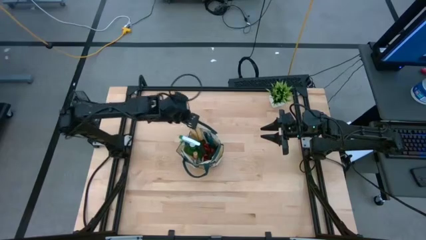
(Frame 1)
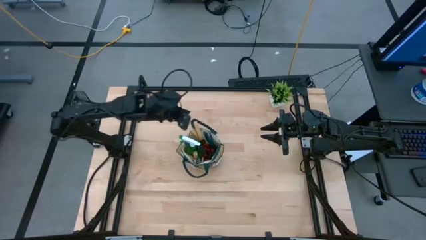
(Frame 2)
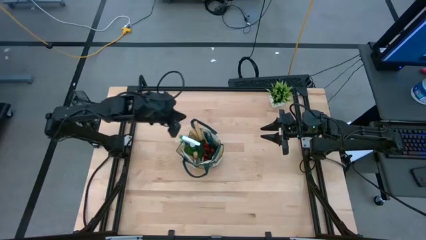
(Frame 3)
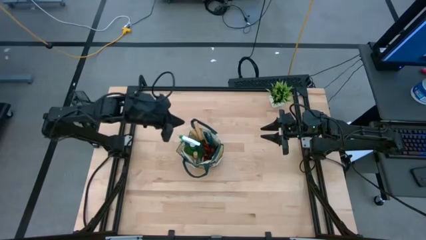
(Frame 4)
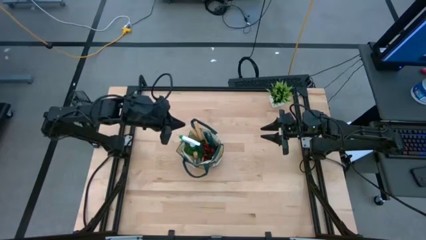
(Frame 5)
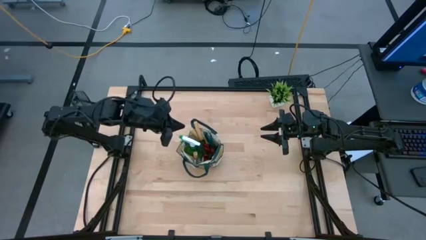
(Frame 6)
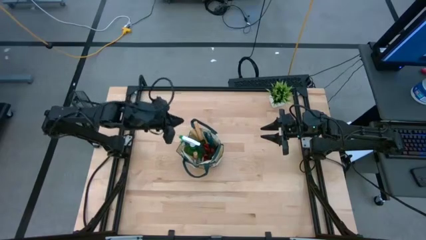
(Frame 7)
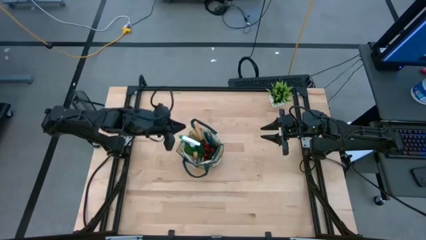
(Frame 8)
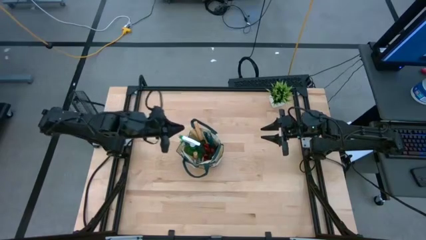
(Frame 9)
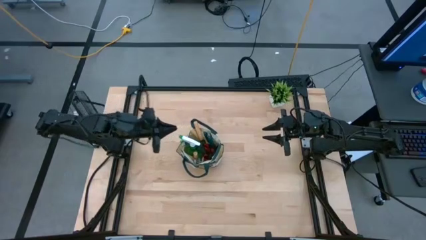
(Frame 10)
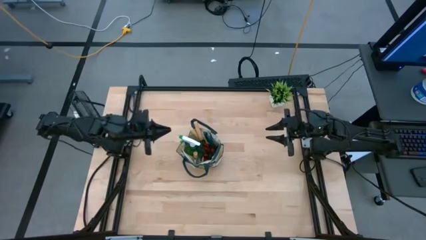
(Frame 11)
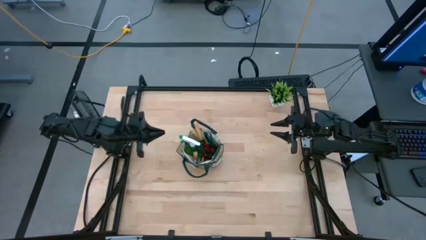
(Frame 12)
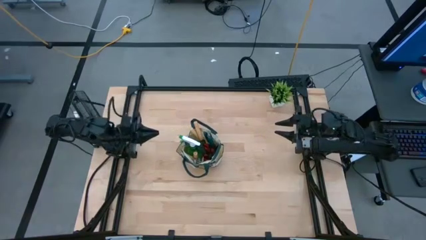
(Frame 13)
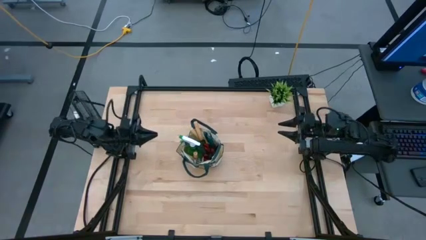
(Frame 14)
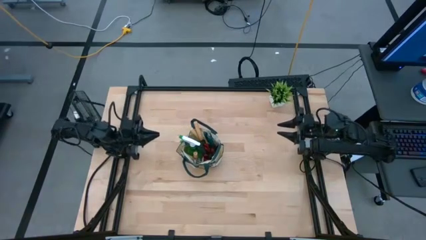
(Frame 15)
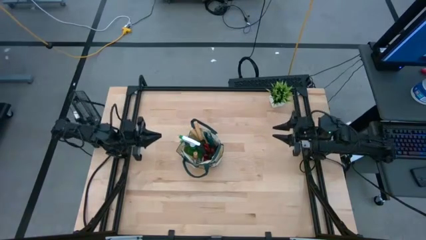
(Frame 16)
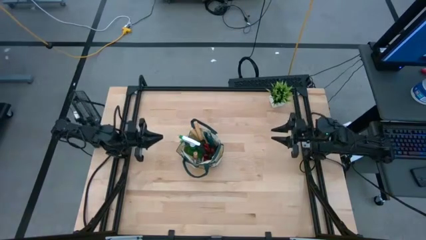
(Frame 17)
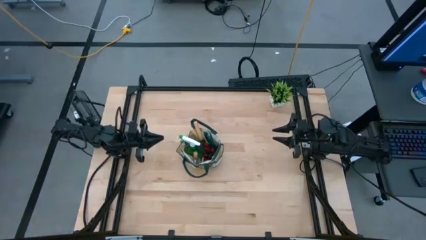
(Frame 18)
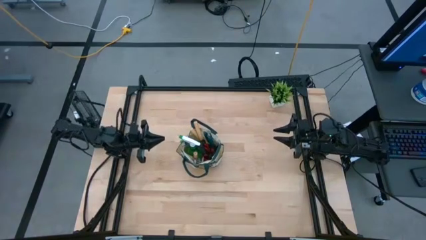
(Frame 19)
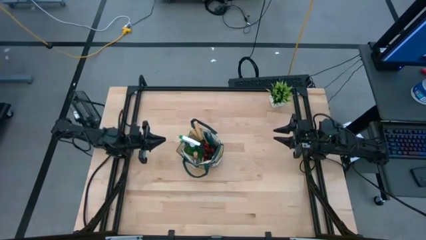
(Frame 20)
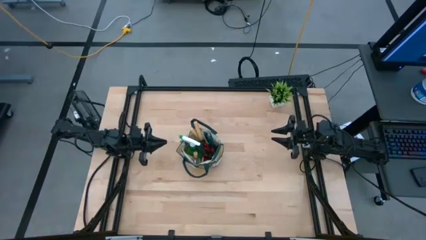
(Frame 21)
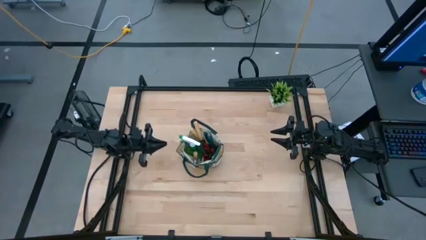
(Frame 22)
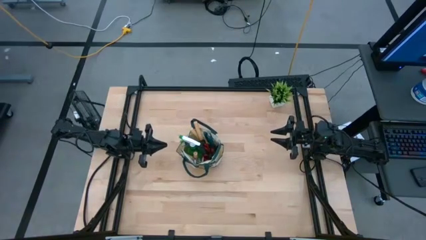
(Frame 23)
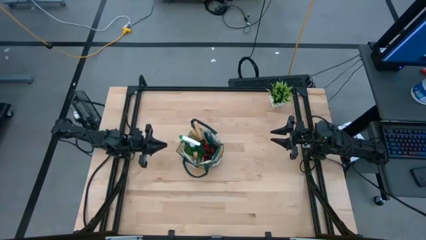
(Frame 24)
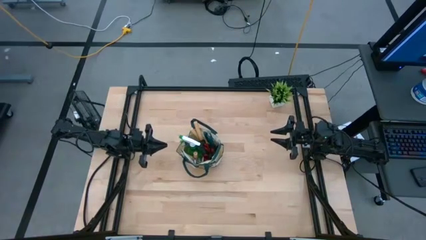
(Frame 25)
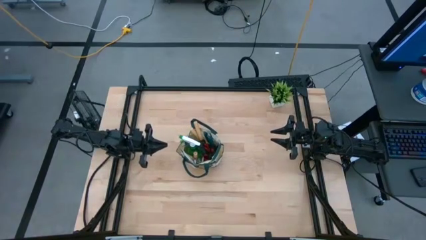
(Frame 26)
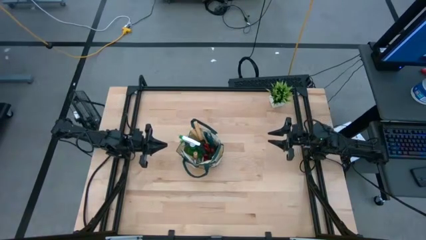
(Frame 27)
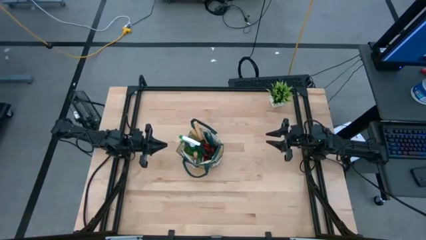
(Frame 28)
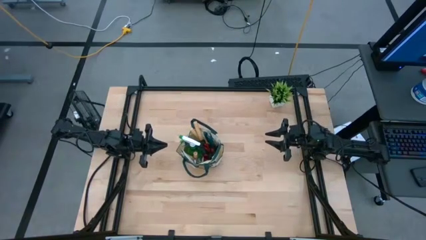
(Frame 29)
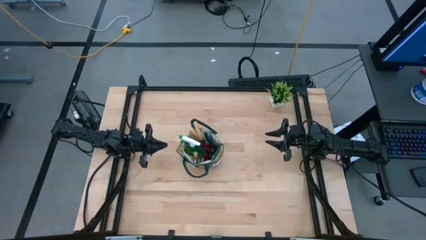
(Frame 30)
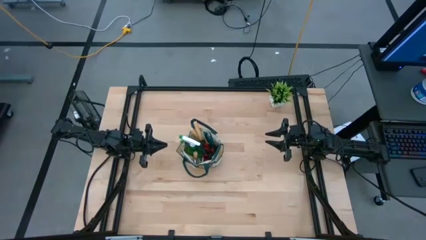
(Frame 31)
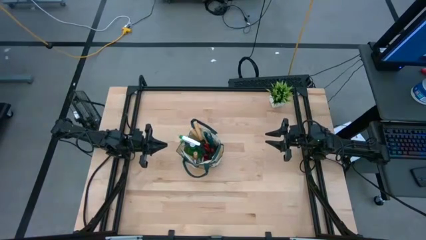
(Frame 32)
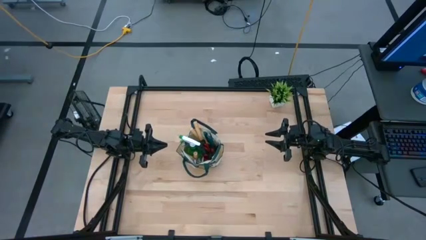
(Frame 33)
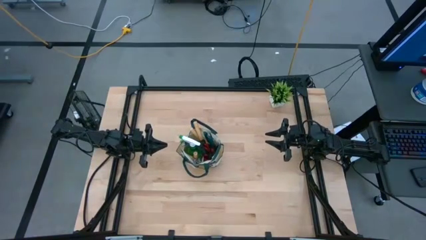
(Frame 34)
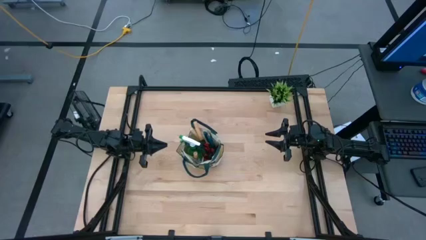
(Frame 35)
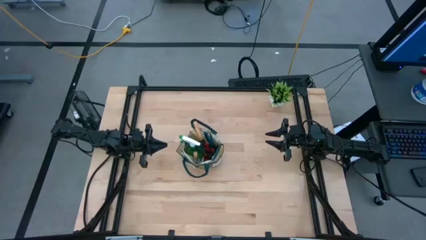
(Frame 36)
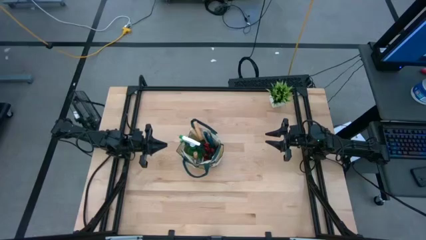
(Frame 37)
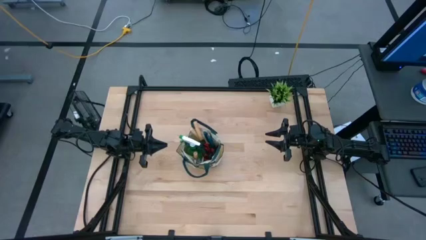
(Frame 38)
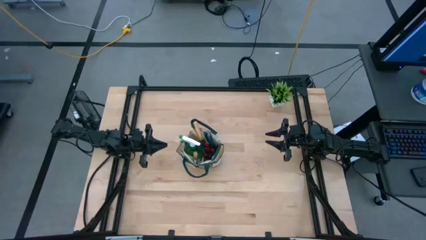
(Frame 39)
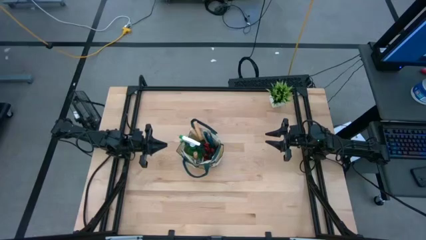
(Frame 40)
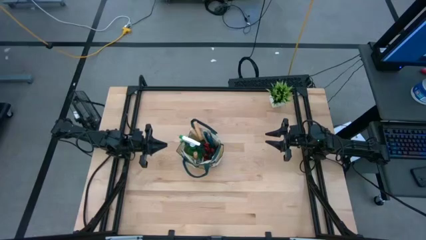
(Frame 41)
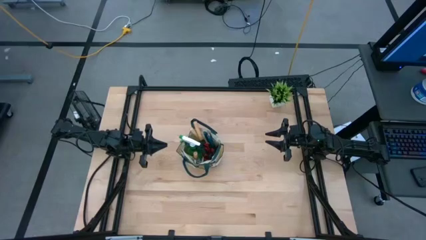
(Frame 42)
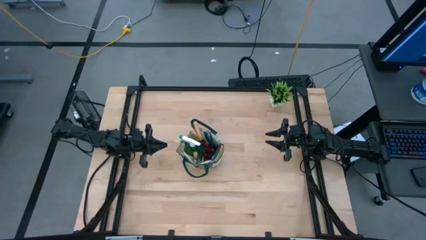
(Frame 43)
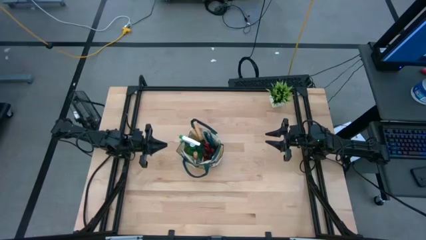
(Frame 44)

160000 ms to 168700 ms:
Task: Pick & Place Garden tools in Gardening bag
Return to Home Position
